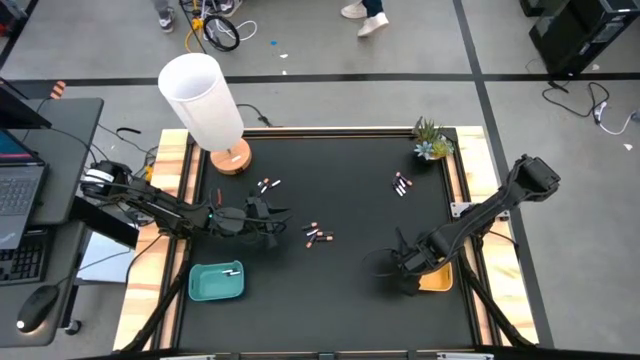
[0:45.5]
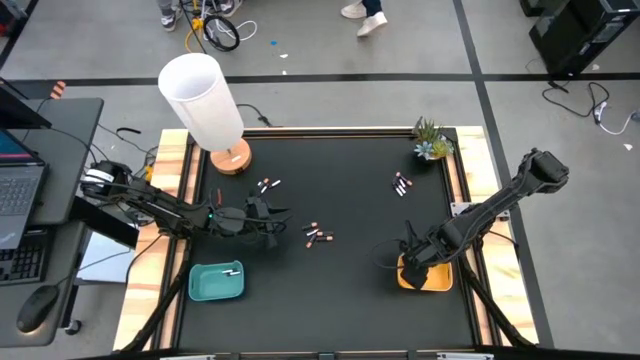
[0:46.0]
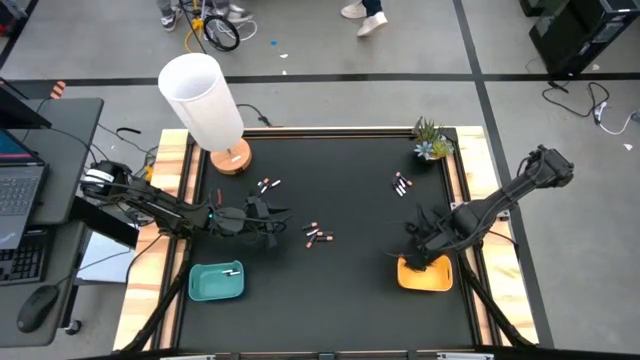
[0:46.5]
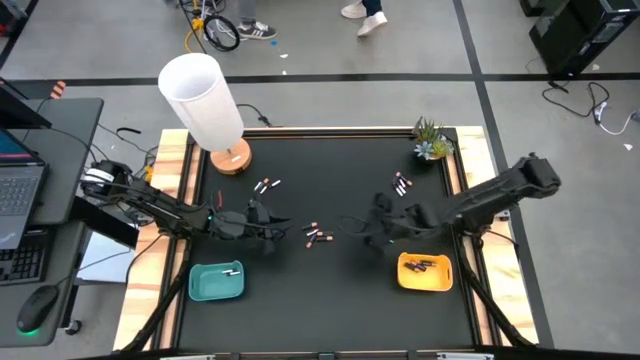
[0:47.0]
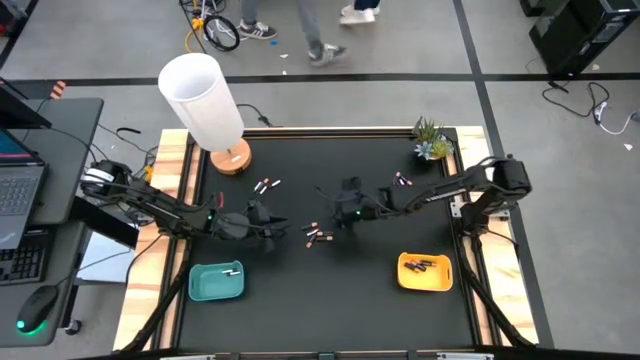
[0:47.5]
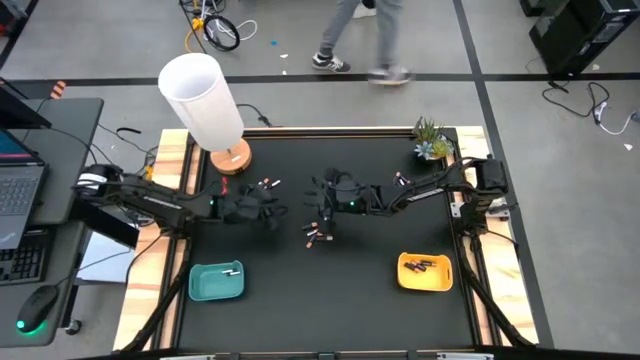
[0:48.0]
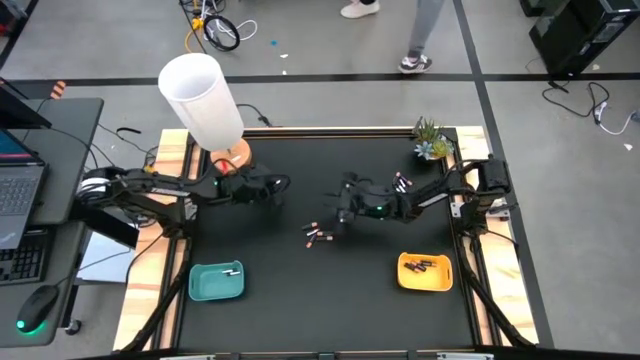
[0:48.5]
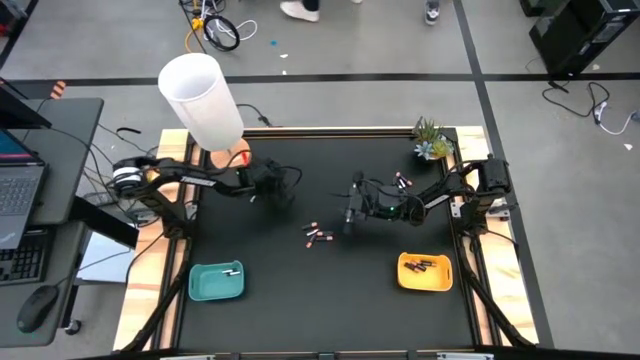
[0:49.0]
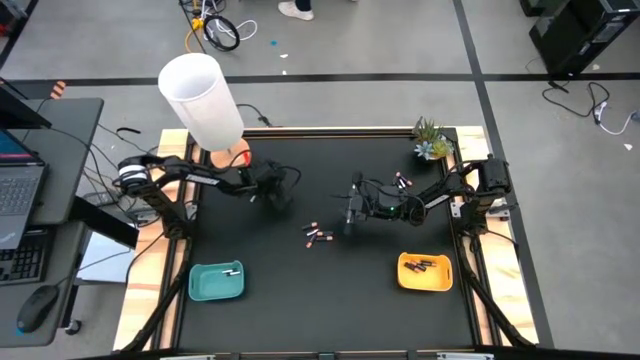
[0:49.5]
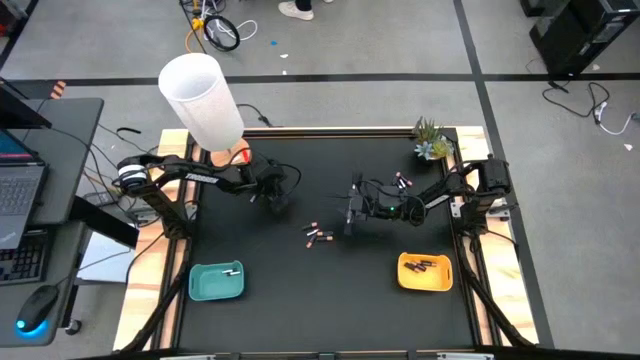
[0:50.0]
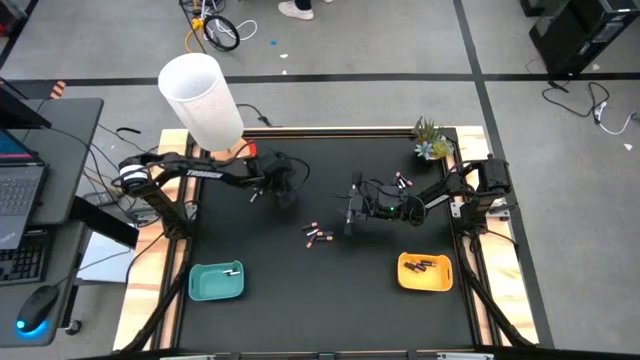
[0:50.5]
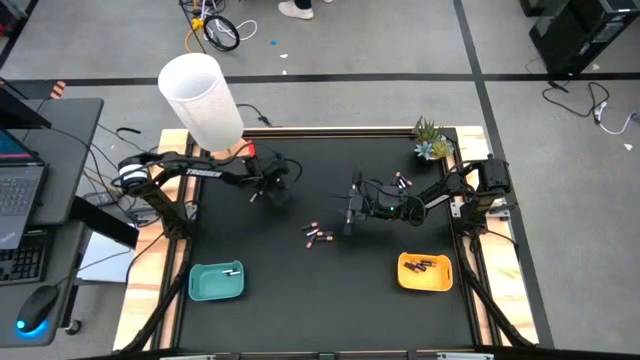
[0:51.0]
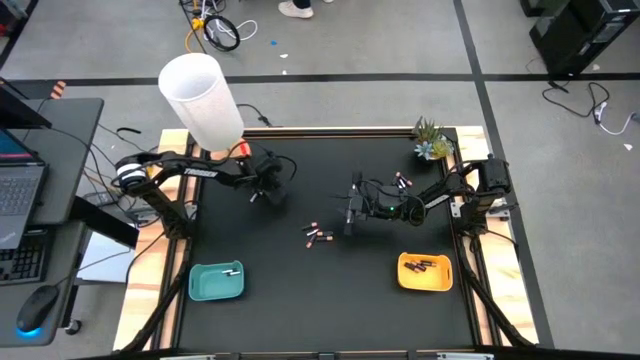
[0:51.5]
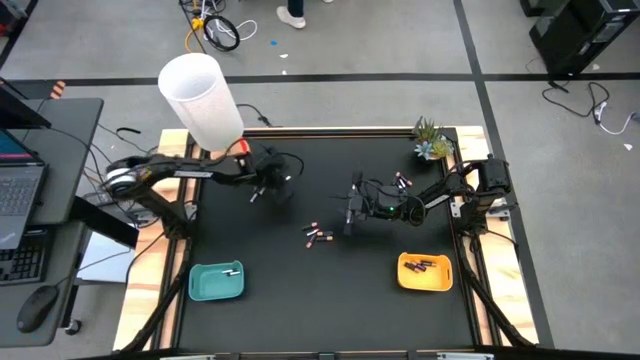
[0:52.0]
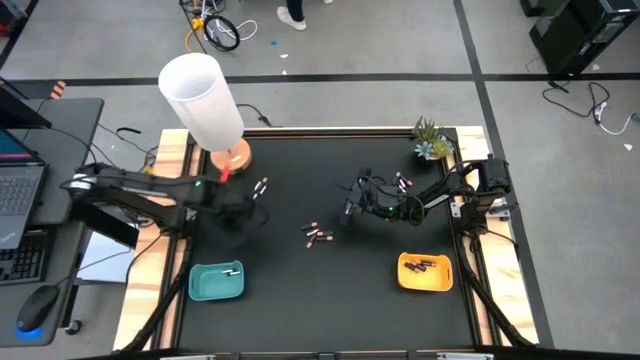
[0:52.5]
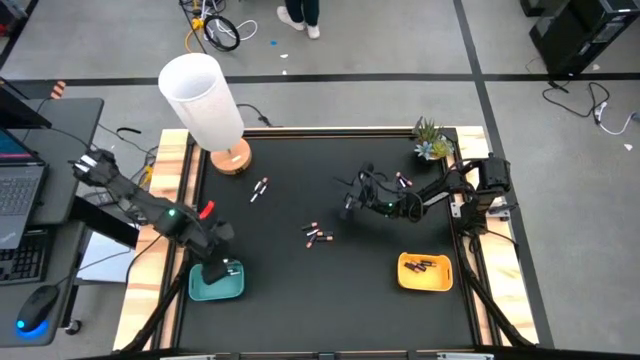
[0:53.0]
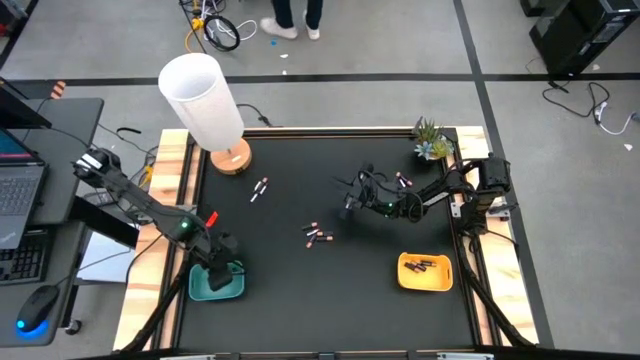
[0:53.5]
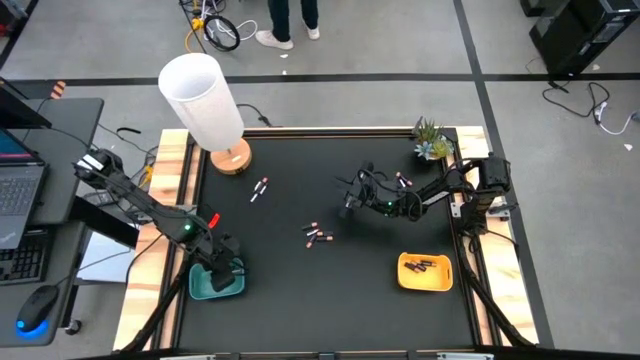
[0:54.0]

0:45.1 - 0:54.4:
Task: Sort batteries
Put the silver battery into the green bin

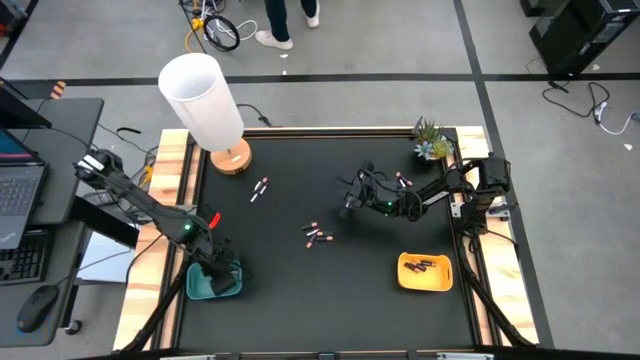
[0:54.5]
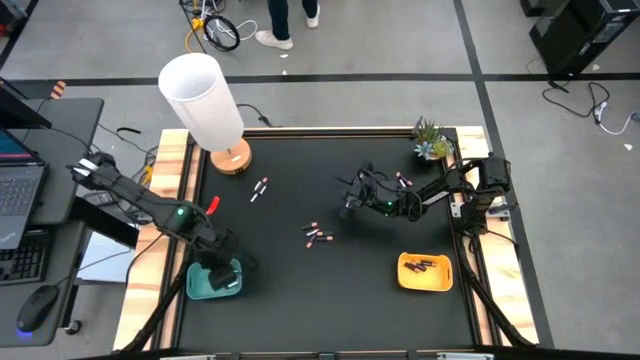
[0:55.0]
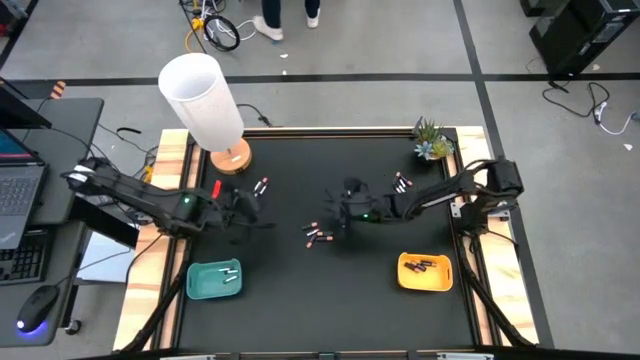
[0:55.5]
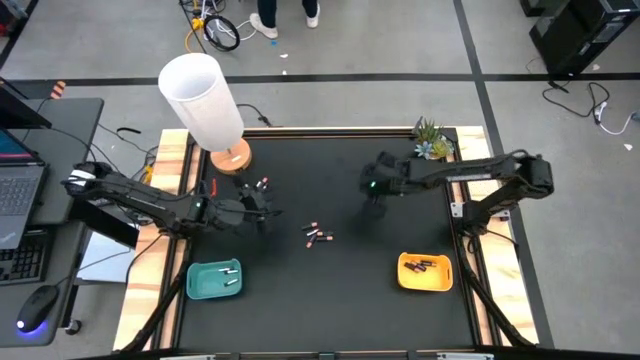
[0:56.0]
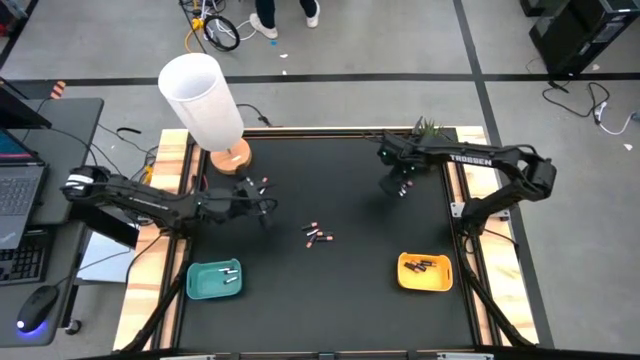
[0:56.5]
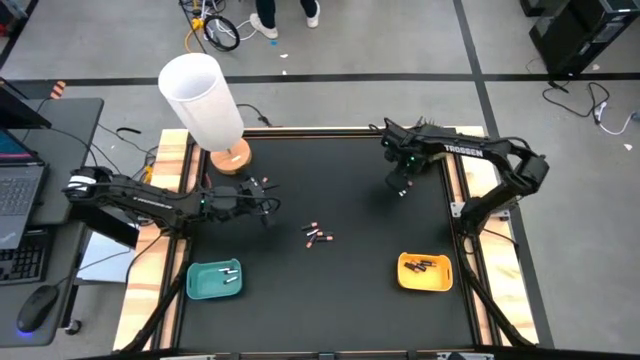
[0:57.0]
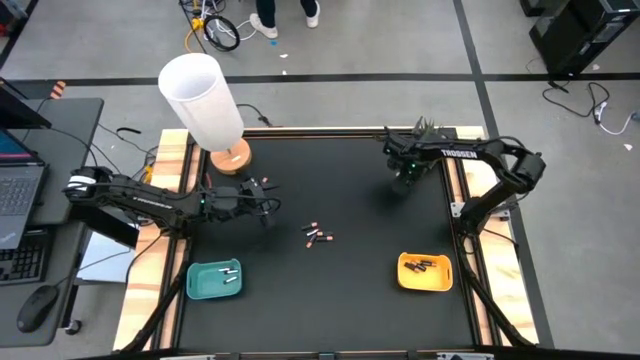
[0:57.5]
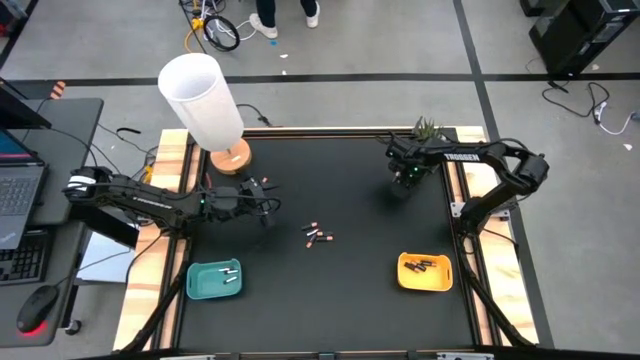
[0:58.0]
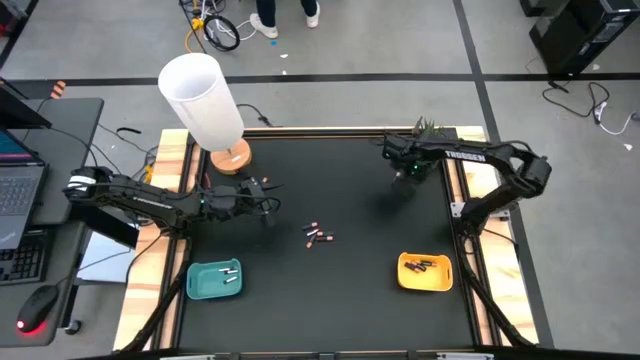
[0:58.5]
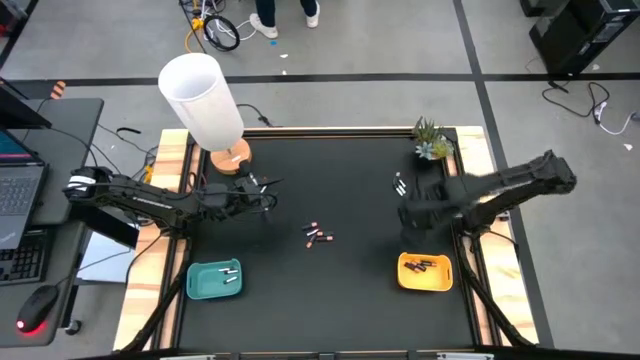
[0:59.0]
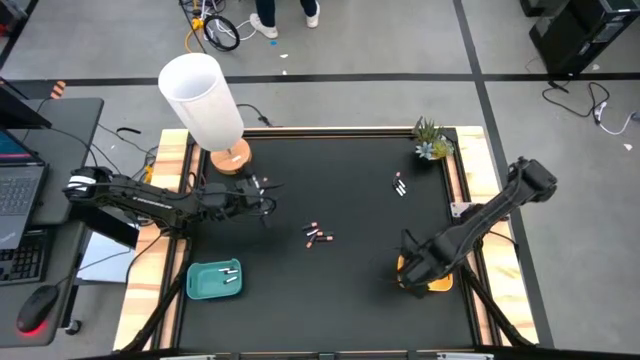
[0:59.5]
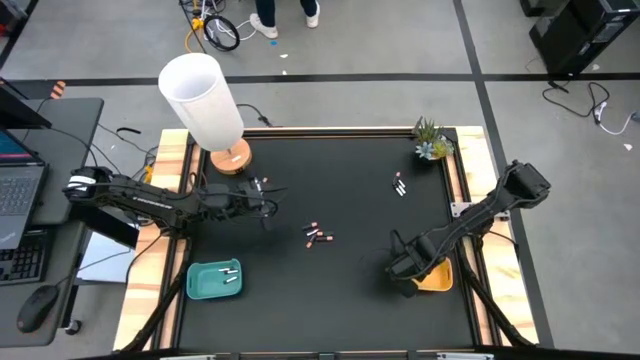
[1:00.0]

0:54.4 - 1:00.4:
Put the black battery into the yellow bin

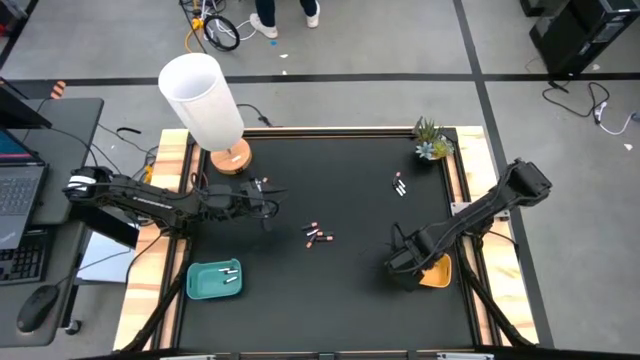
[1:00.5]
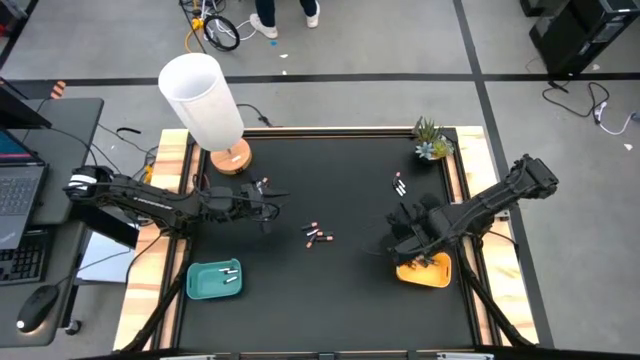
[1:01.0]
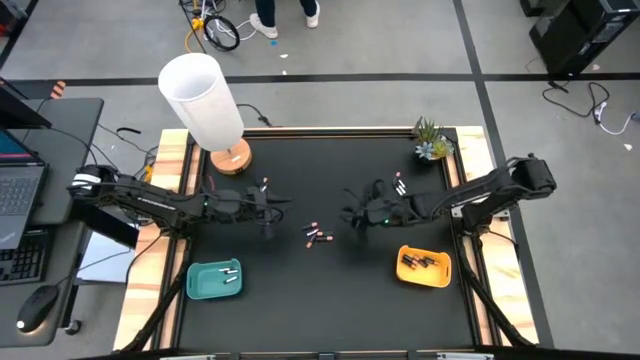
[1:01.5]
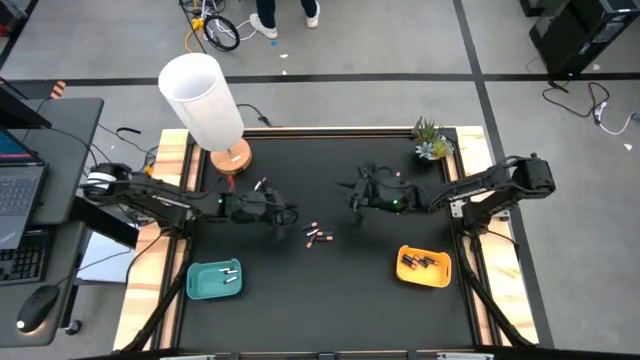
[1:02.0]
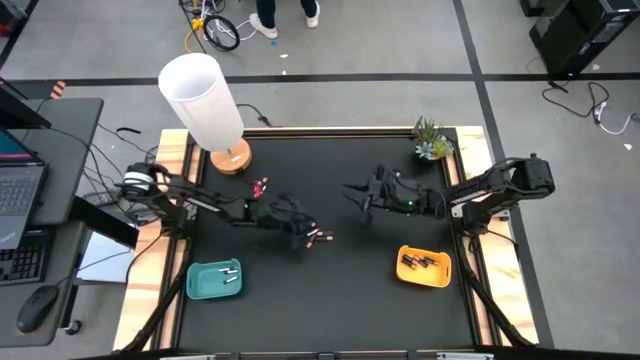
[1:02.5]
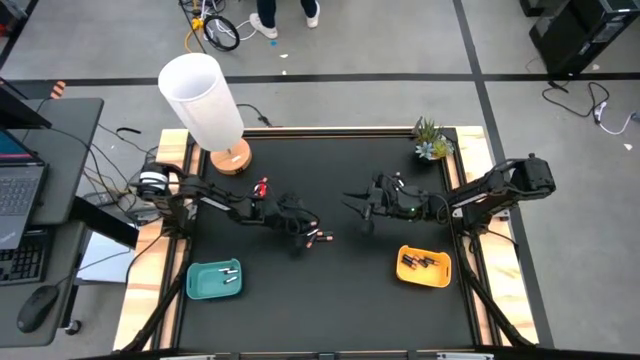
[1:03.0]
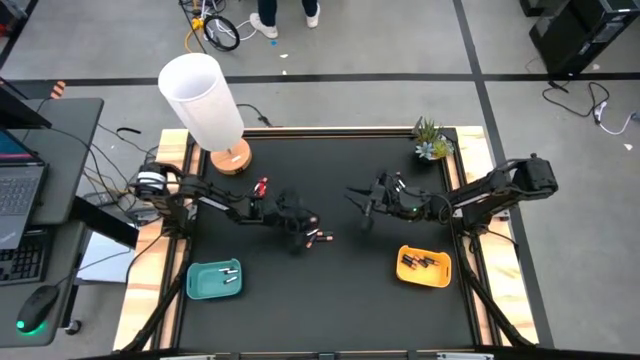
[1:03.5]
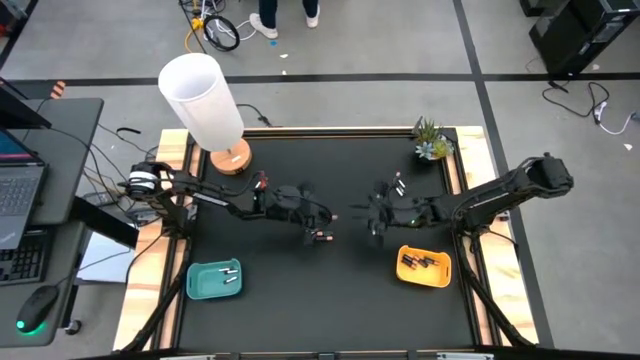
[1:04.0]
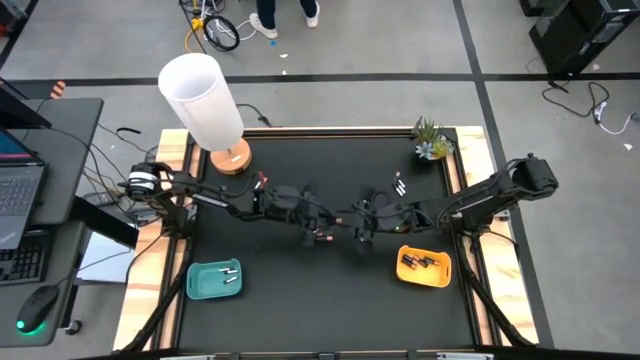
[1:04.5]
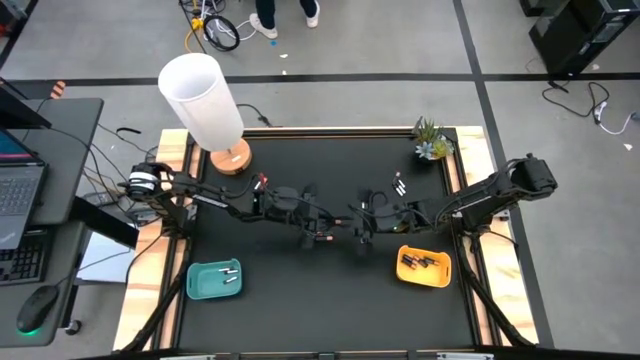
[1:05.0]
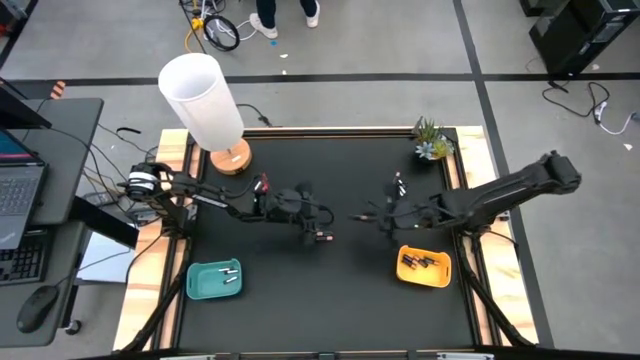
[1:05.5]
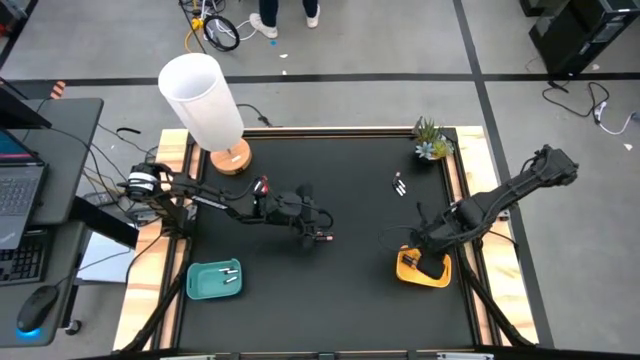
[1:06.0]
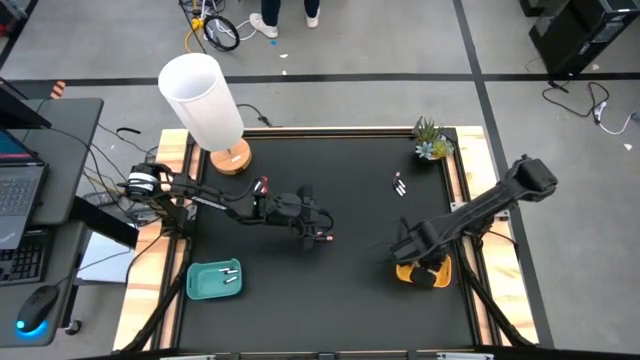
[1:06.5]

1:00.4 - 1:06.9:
Put the black battery into the yellow bin

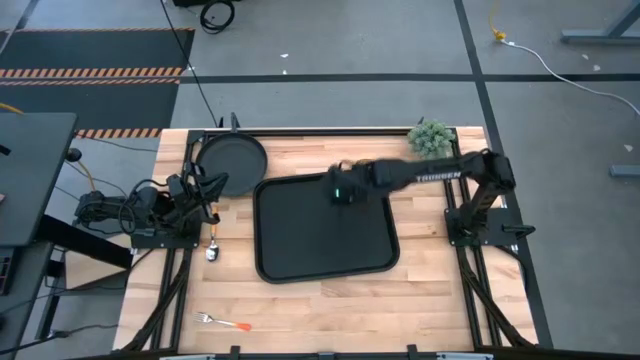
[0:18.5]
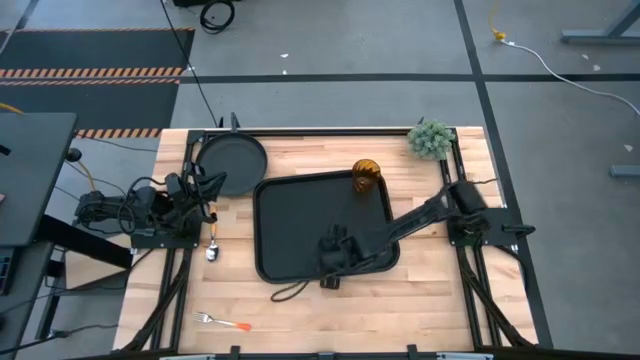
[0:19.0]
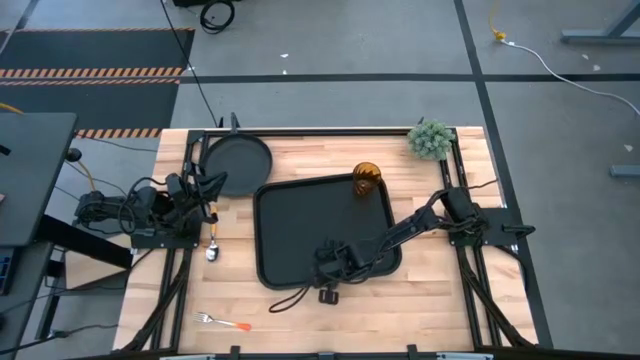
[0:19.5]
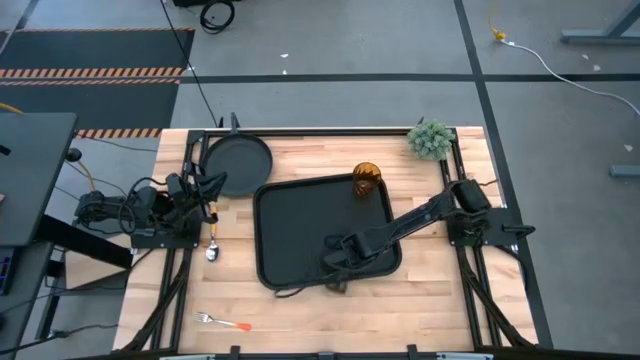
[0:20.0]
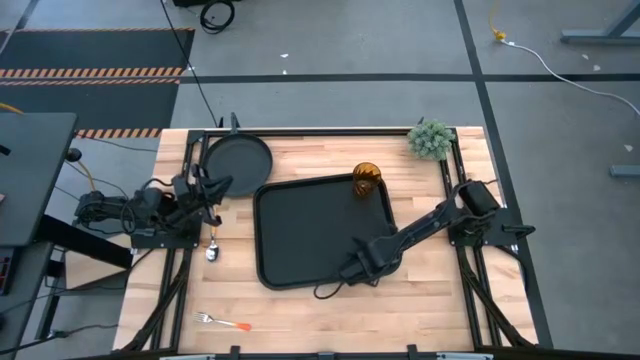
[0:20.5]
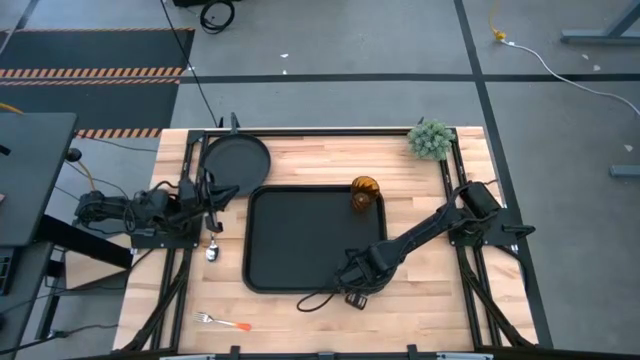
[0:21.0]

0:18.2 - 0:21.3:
Task: Pick and place plate/cup/fork/spoon on tray
Adjust the black serving tray
